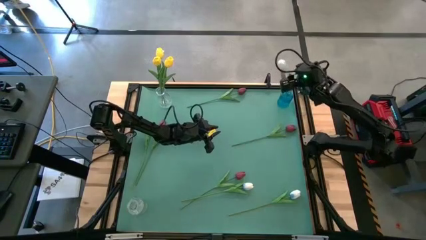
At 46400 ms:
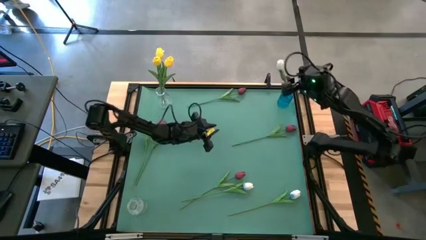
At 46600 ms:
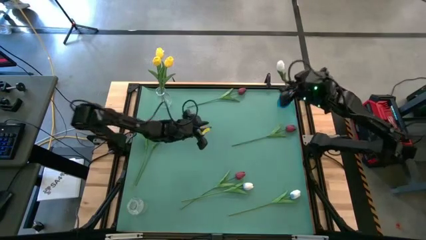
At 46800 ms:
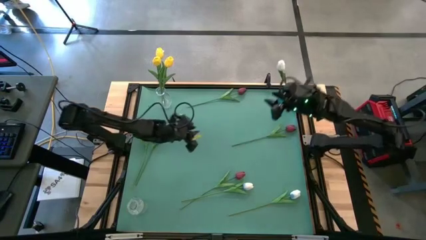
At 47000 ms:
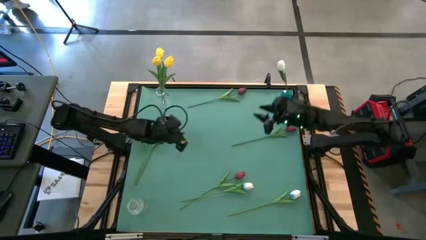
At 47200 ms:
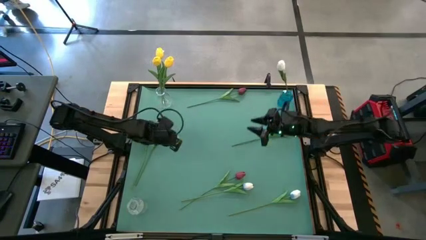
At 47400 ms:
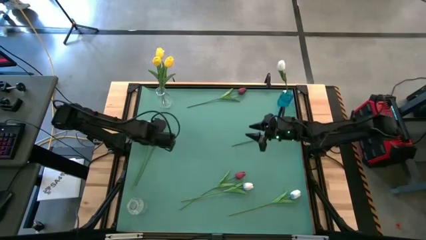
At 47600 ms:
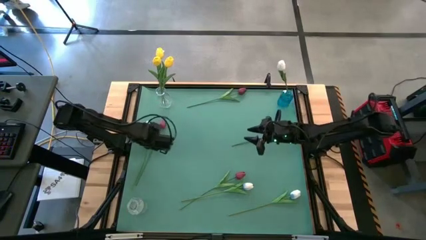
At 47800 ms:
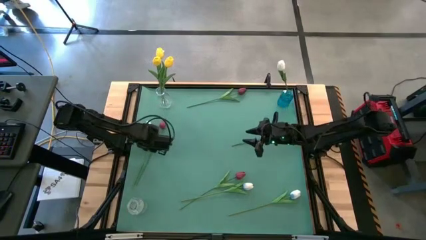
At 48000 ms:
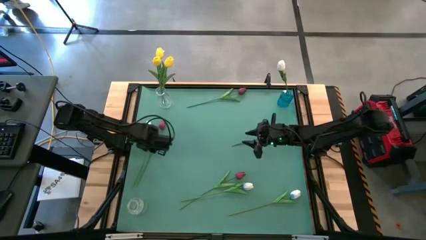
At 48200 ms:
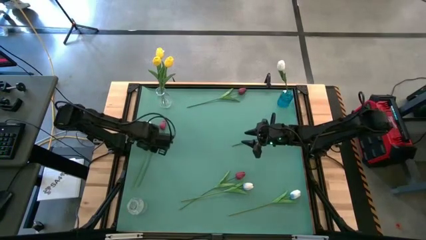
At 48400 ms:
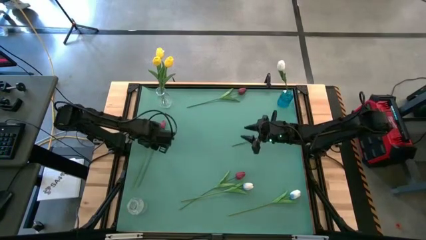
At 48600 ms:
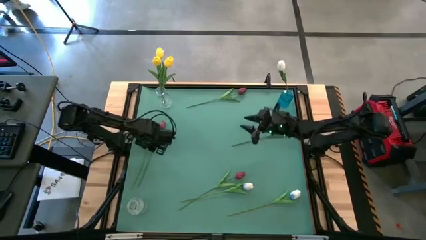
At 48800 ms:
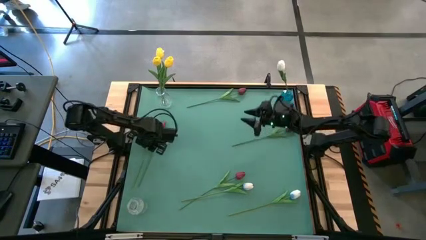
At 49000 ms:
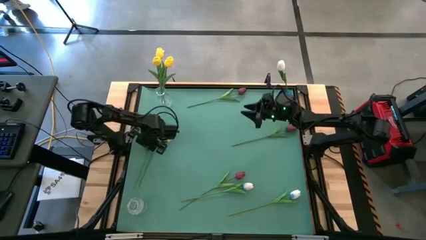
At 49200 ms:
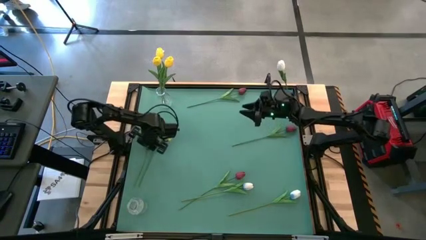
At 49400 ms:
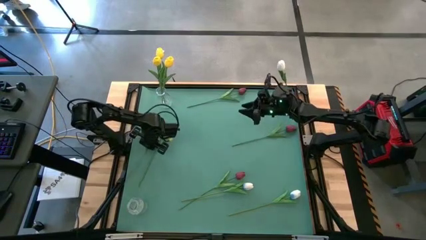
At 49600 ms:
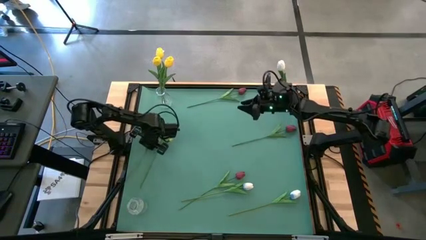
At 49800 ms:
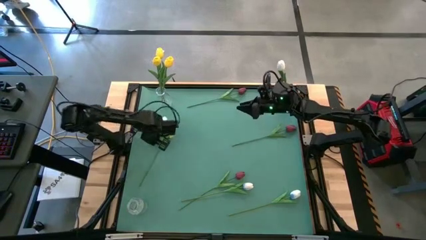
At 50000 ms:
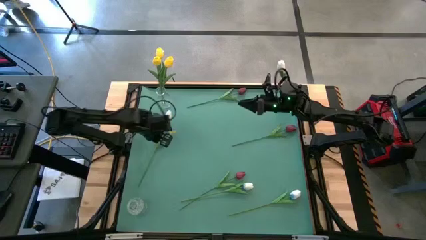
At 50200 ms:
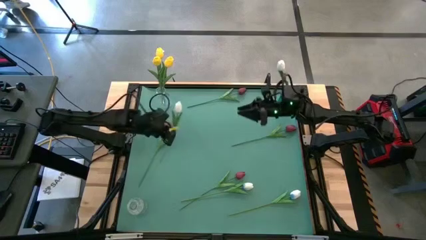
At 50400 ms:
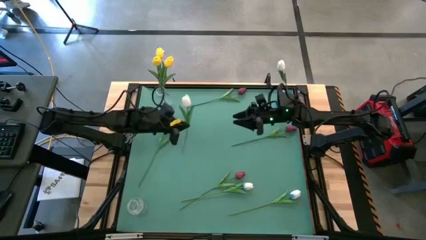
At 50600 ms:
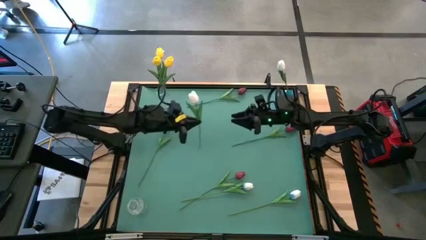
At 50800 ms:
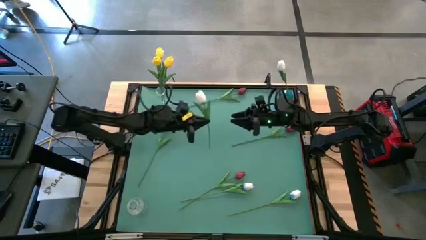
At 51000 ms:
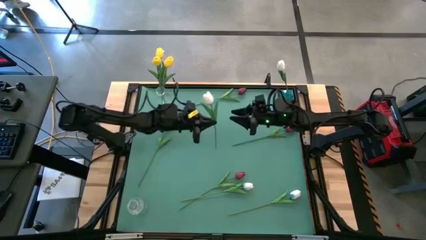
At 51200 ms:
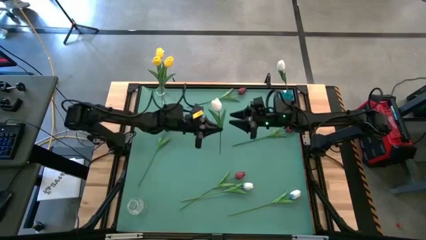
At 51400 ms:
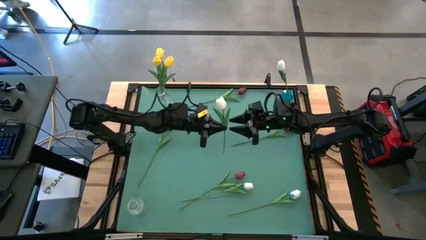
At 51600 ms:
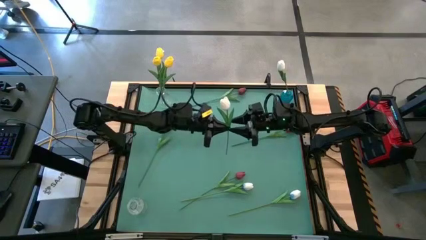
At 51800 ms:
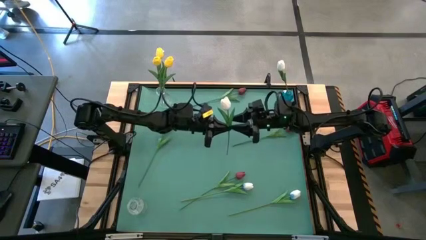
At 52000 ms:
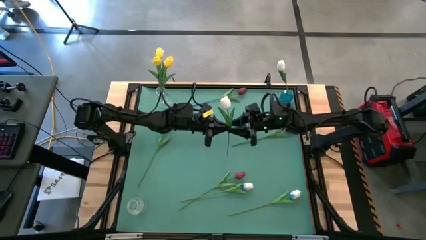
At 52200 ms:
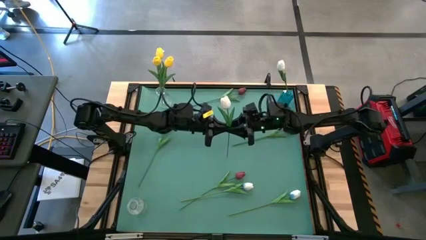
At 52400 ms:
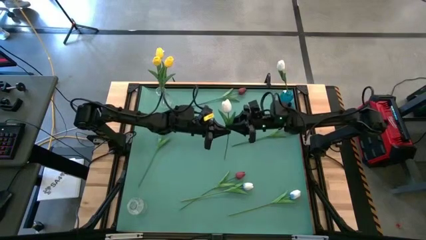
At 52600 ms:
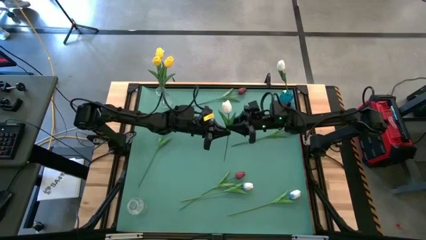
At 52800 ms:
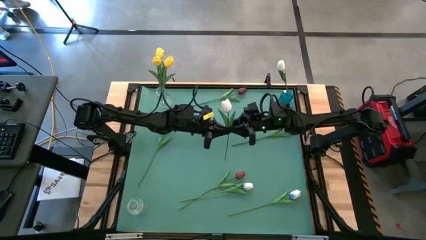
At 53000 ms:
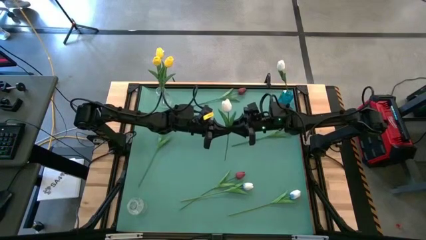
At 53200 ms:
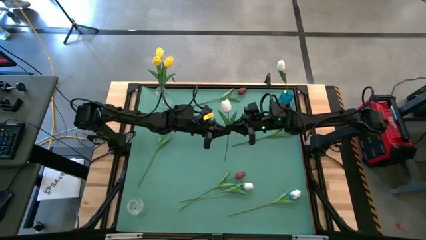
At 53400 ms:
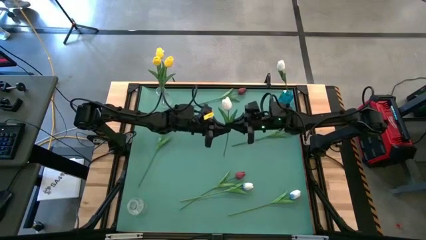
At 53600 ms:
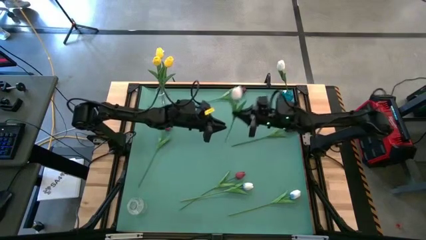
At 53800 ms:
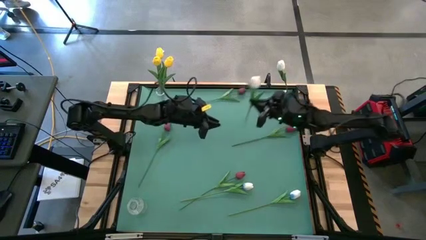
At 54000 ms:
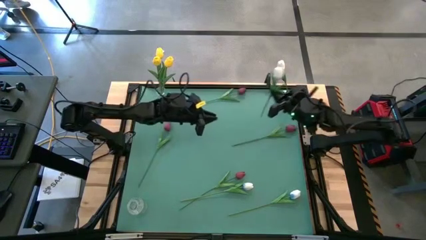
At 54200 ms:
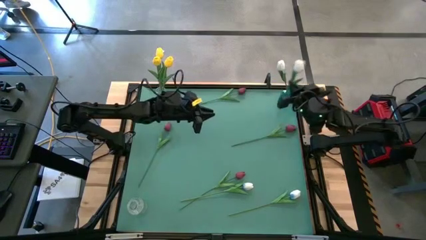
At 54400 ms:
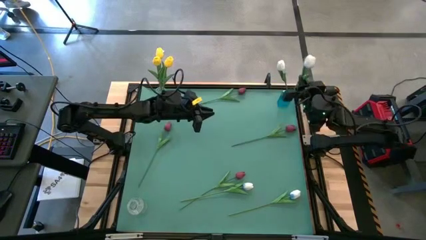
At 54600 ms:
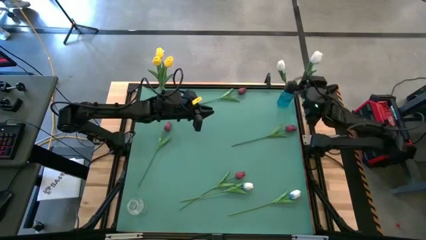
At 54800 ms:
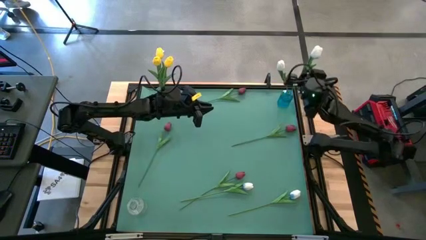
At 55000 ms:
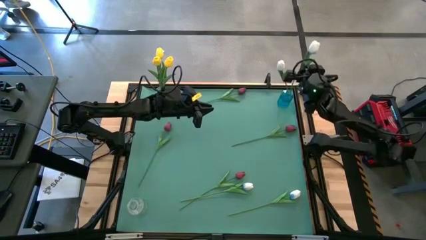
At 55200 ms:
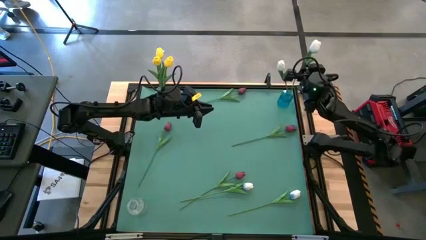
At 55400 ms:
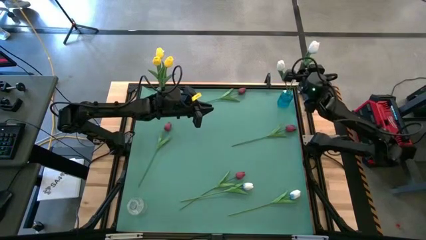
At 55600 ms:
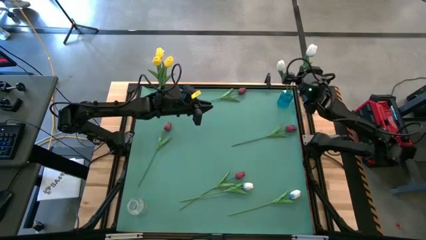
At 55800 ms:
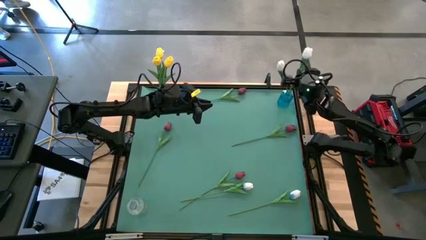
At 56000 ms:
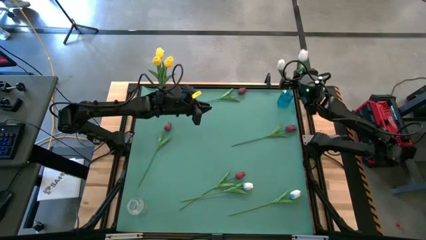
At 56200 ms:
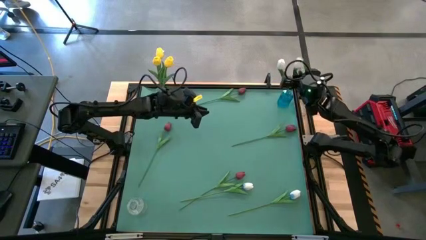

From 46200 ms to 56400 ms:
Task: Sort flowers into vase by color
Put the top white flower into the blue vase

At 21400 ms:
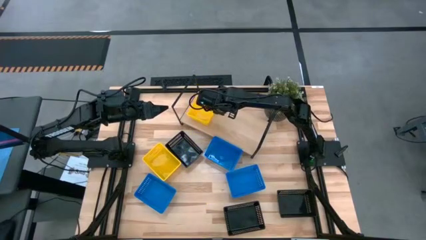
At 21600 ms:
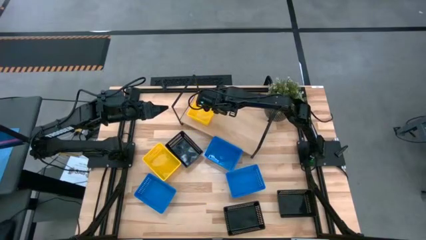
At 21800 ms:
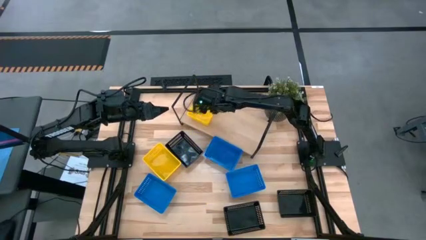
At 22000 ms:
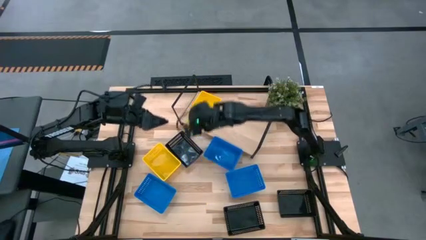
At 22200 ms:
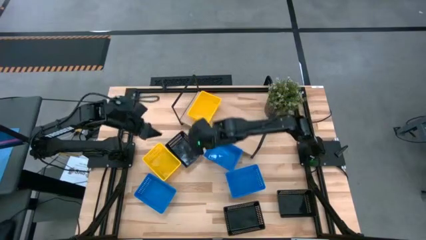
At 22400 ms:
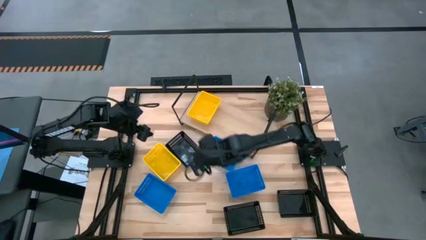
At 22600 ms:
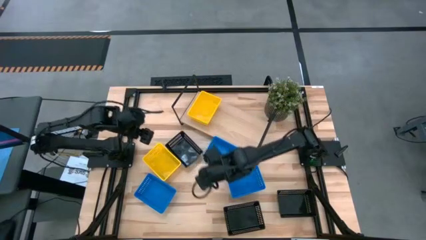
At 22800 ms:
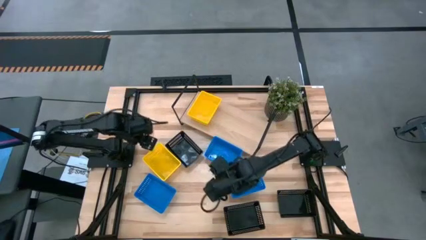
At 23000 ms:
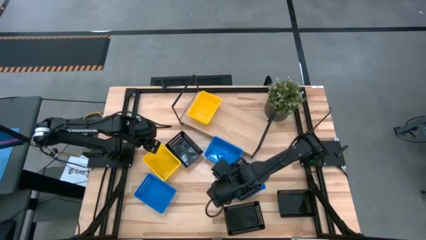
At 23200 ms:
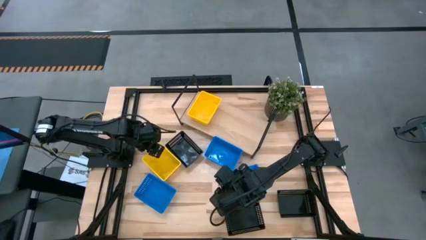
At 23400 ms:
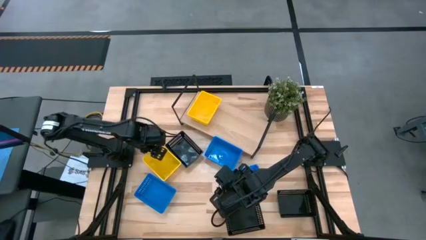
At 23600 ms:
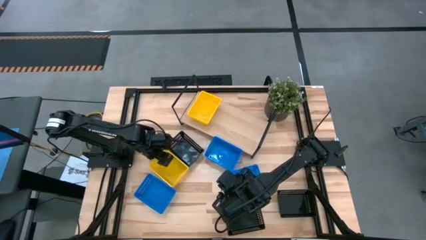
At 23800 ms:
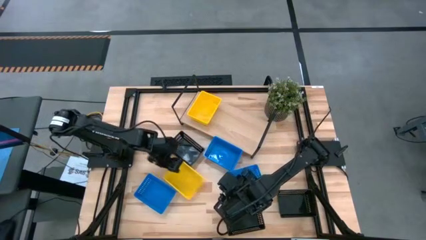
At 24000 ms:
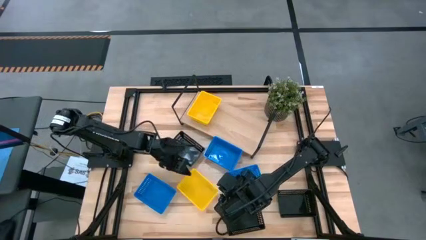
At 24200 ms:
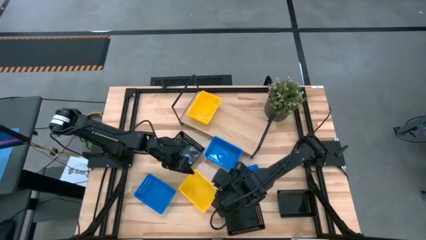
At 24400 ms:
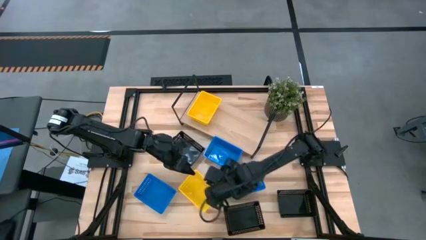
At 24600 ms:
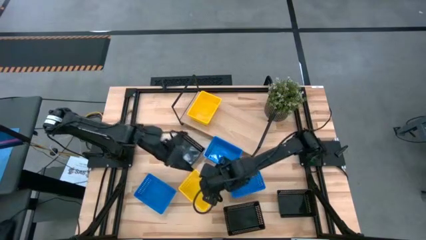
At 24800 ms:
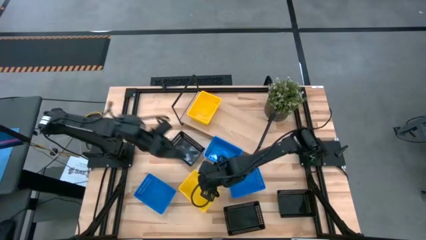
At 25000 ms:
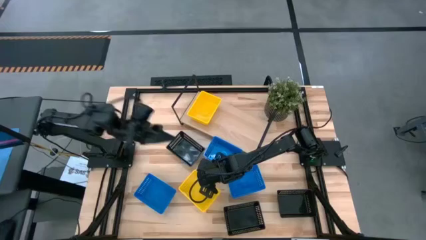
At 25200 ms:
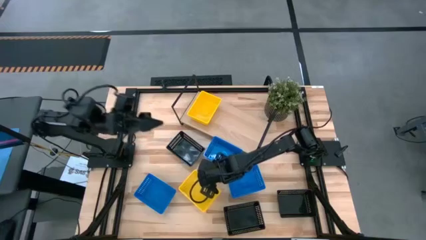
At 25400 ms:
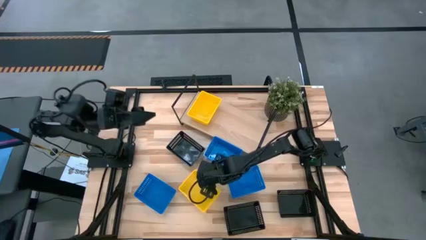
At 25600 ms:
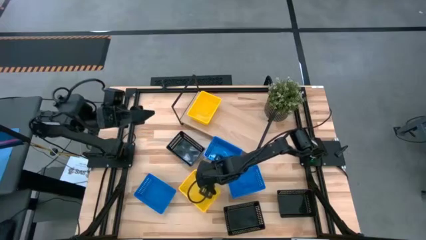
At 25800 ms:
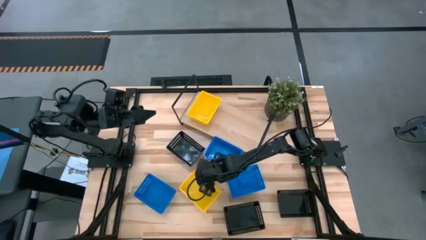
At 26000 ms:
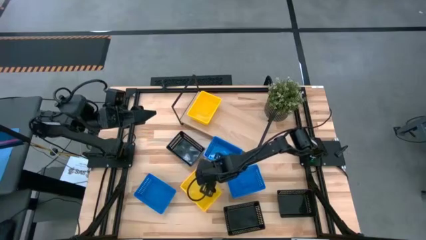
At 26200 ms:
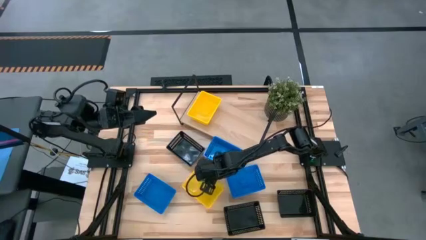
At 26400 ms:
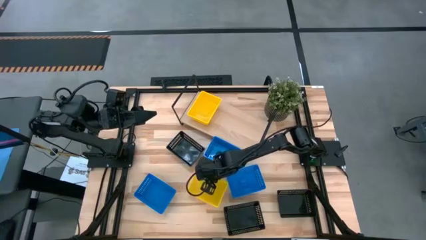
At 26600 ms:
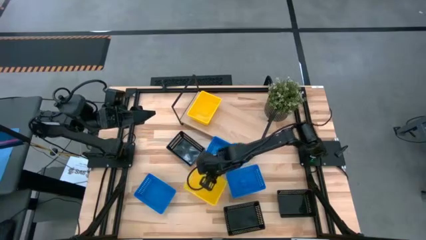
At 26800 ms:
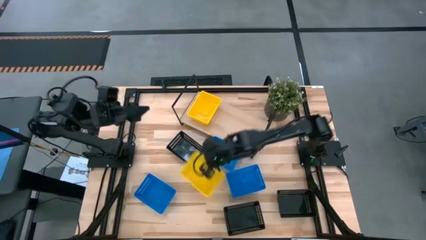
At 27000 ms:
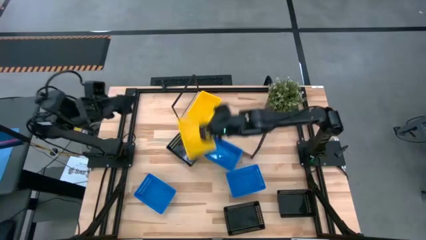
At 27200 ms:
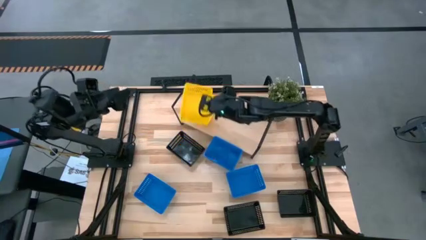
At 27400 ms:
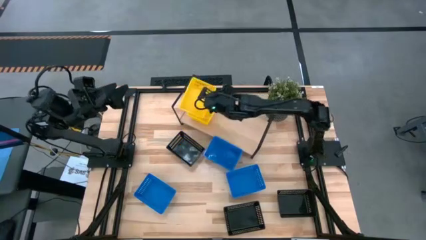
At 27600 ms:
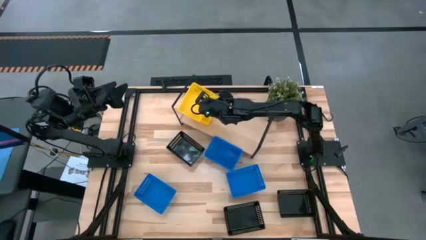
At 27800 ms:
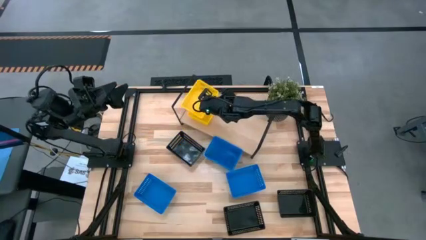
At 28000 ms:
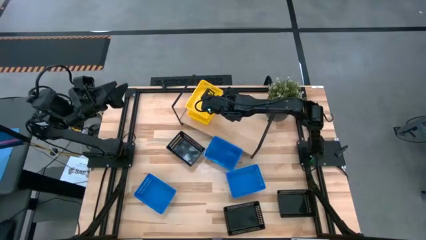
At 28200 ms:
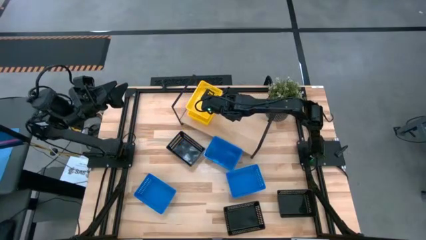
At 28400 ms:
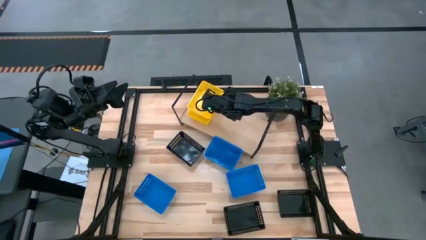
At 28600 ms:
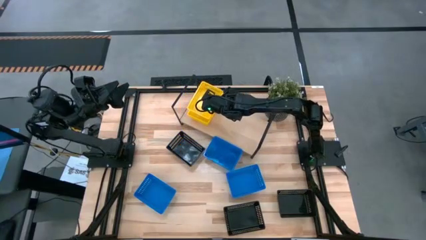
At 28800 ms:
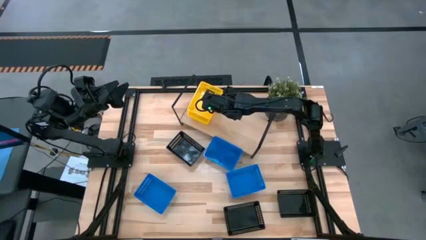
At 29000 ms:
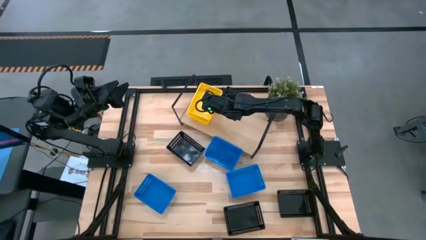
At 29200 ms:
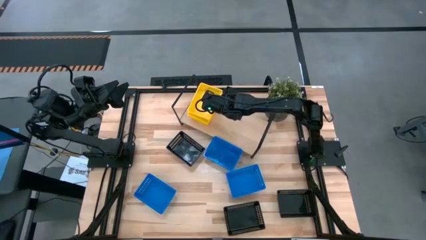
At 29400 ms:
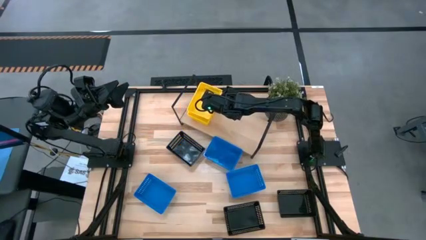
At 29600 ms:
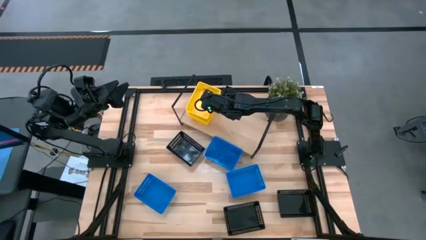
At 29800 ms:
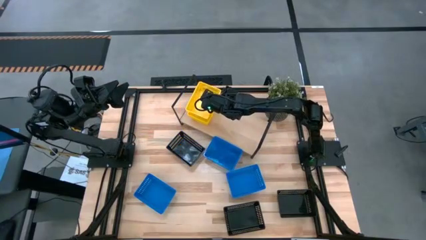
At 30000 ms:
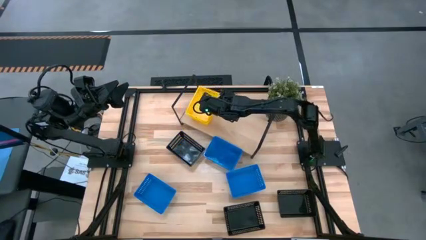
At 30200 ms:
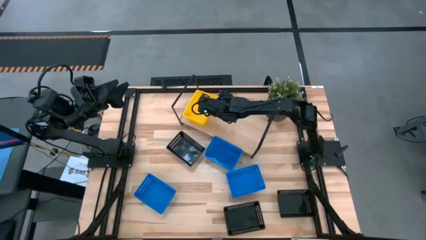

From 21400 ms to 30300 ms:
Task: Stack baskets on shelf by color
Stack the yellow bin on the top of the yellow bin on the shelf
